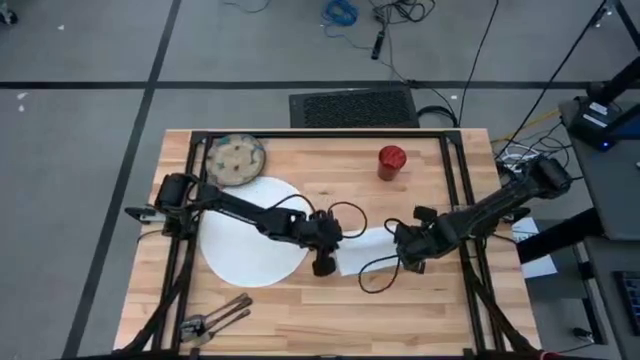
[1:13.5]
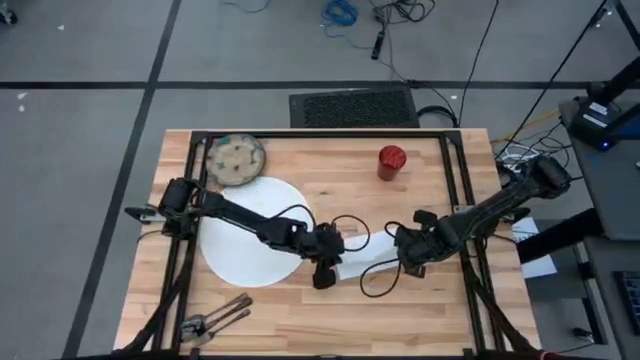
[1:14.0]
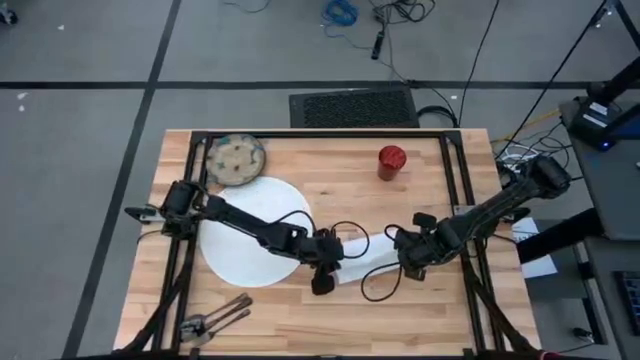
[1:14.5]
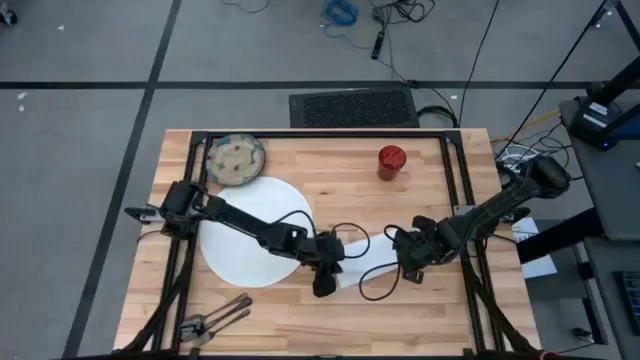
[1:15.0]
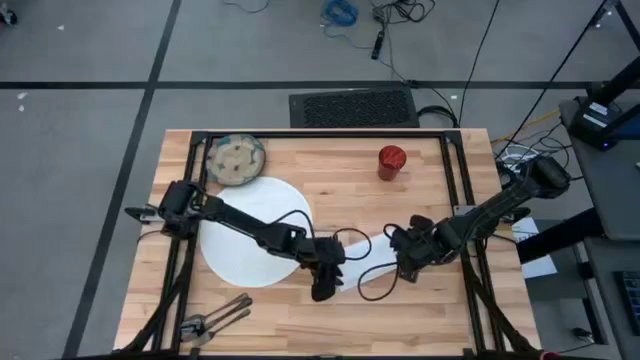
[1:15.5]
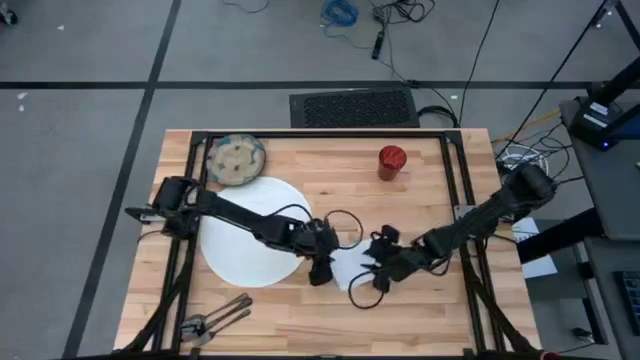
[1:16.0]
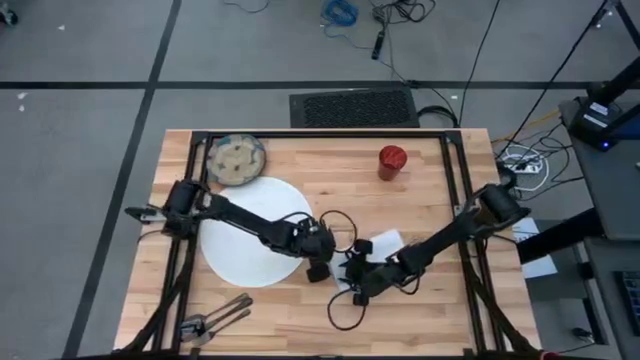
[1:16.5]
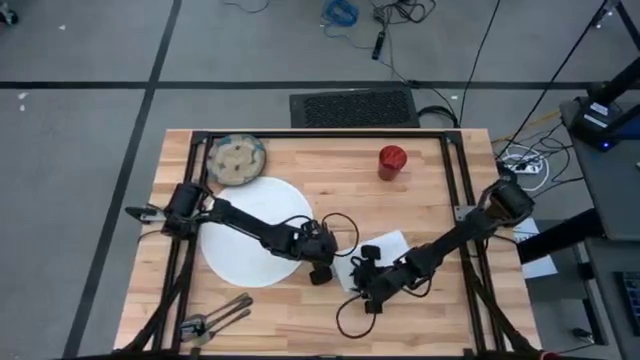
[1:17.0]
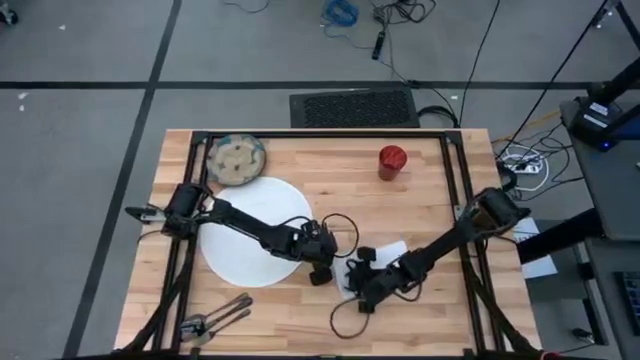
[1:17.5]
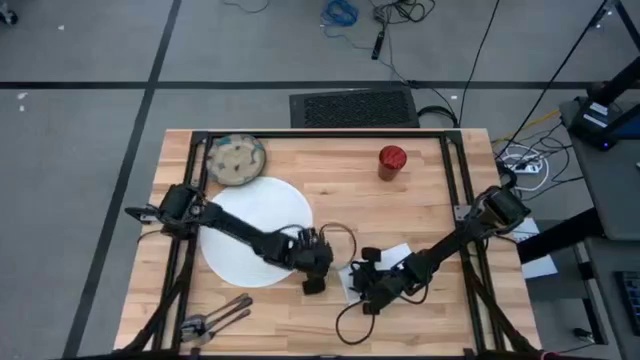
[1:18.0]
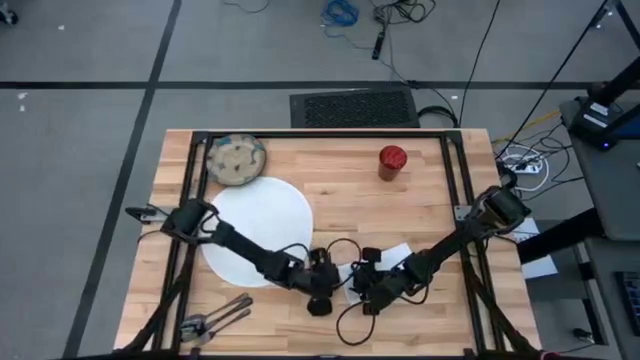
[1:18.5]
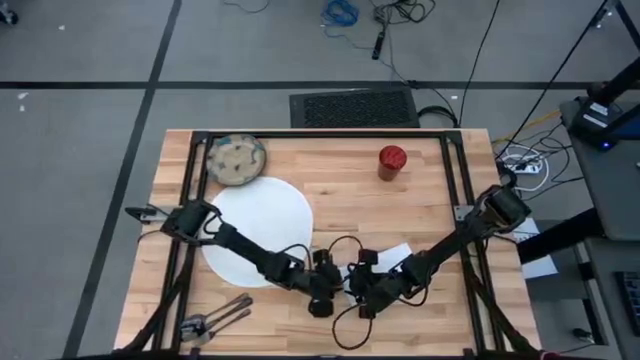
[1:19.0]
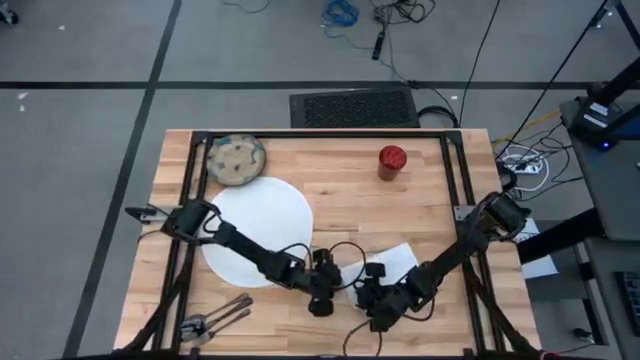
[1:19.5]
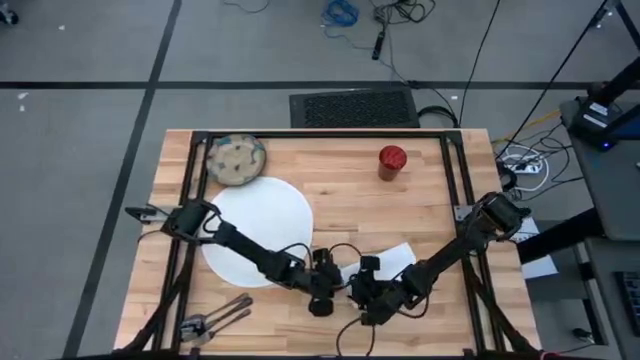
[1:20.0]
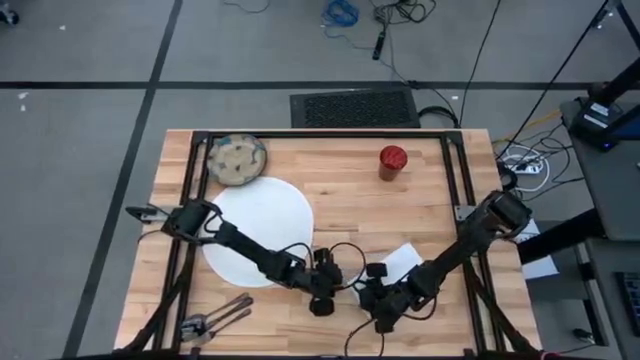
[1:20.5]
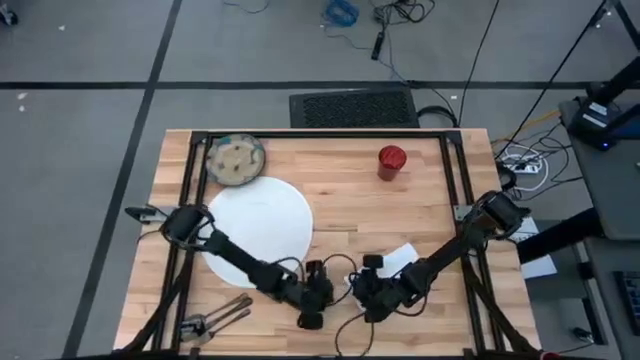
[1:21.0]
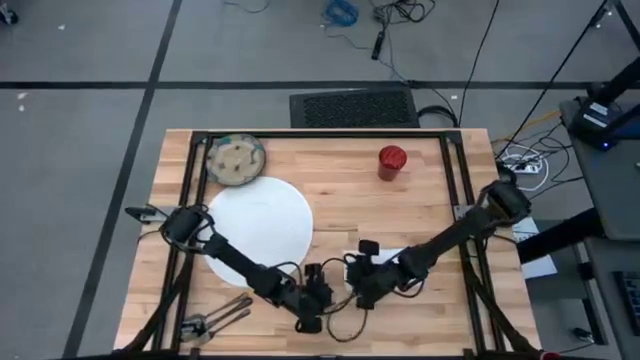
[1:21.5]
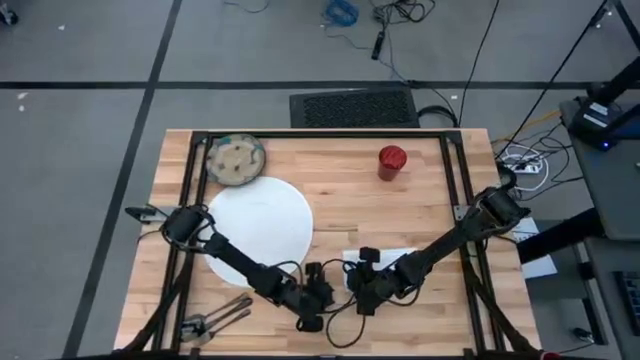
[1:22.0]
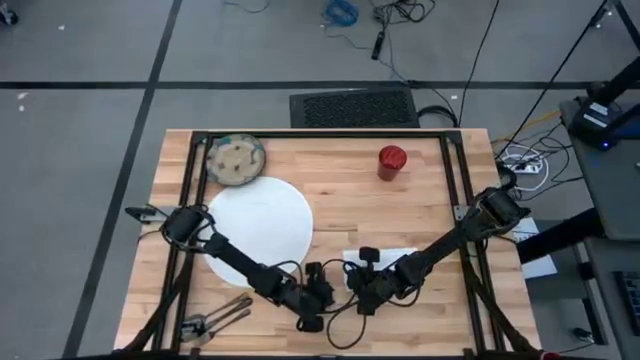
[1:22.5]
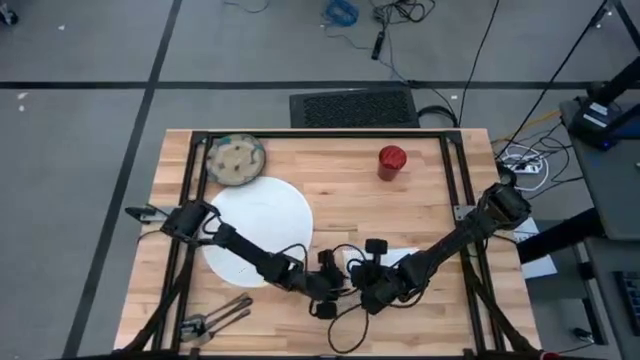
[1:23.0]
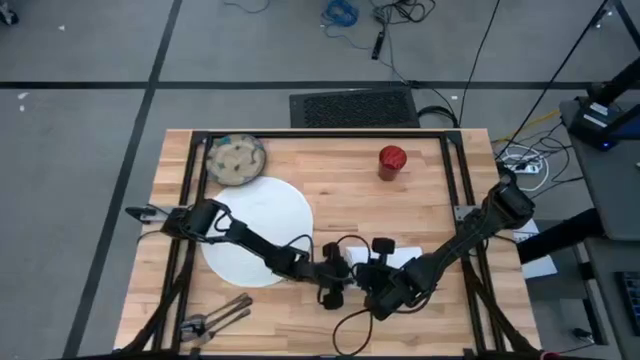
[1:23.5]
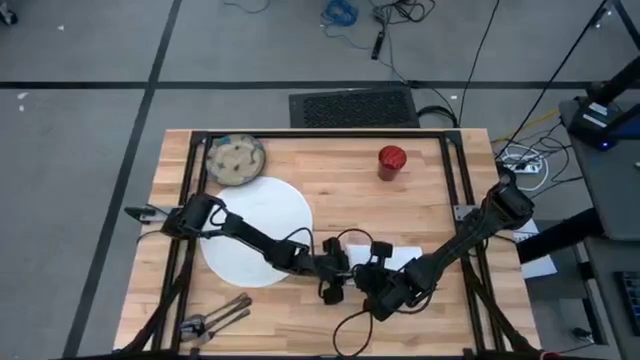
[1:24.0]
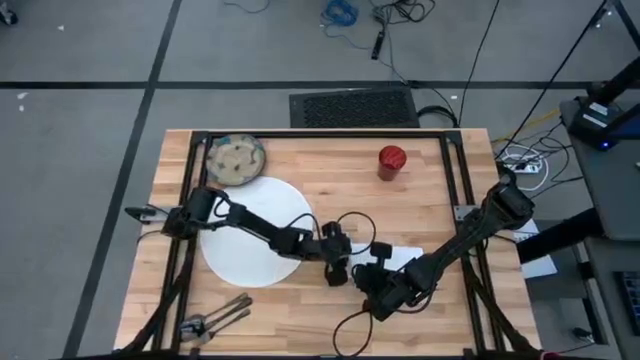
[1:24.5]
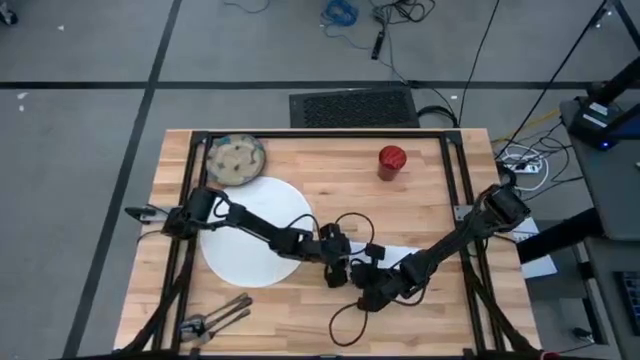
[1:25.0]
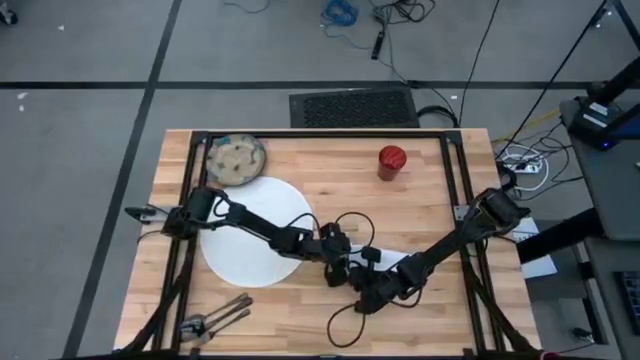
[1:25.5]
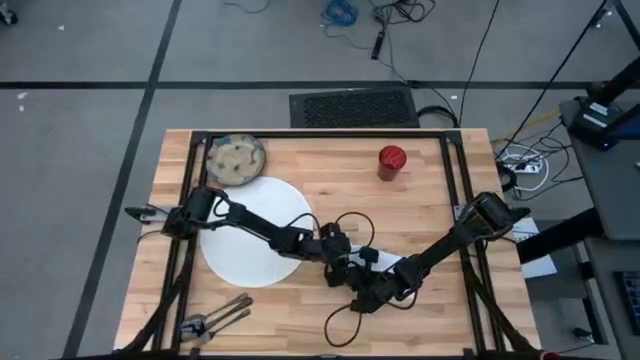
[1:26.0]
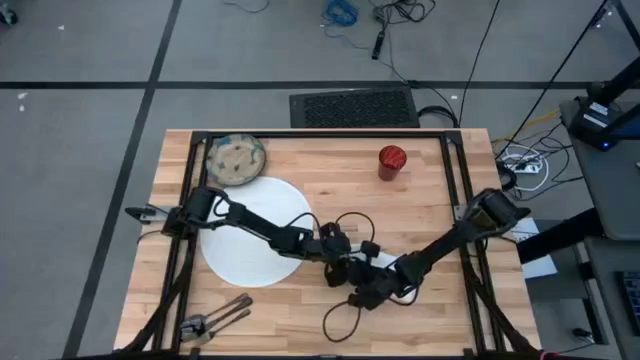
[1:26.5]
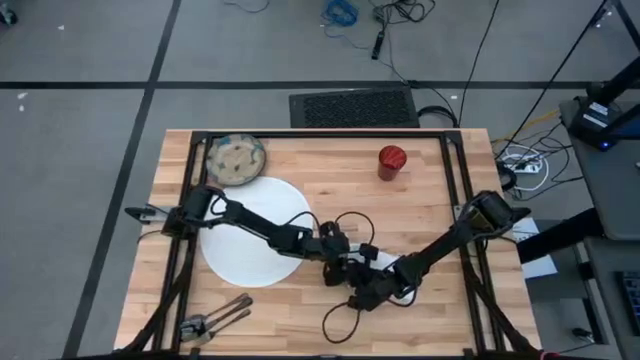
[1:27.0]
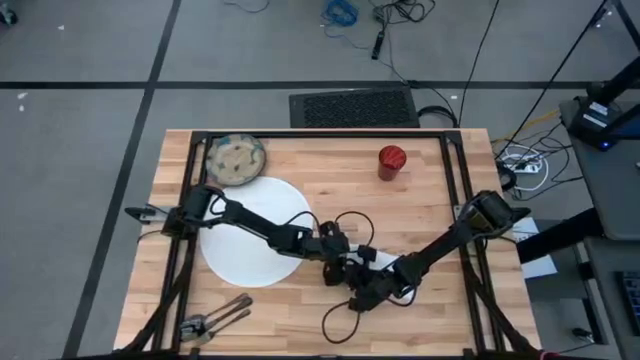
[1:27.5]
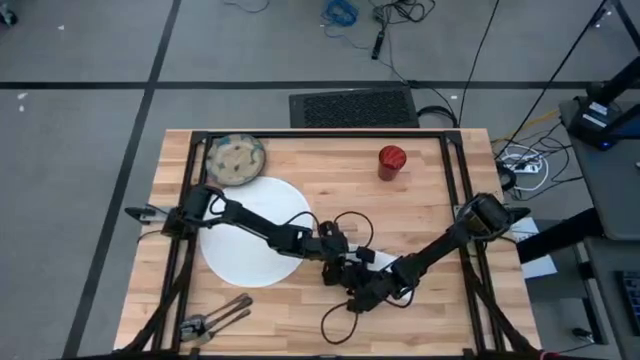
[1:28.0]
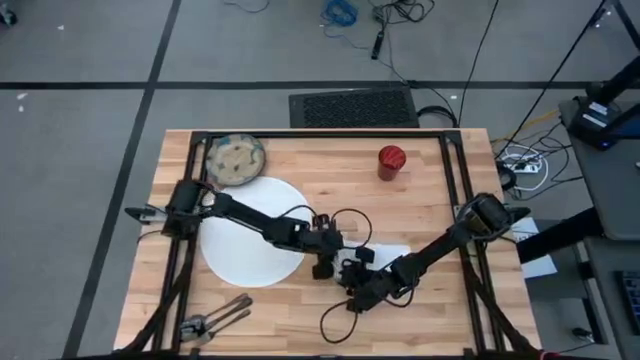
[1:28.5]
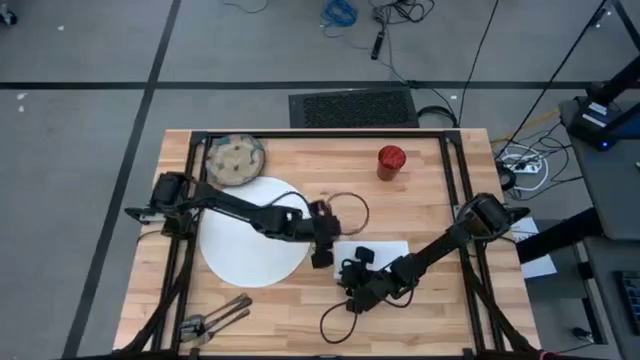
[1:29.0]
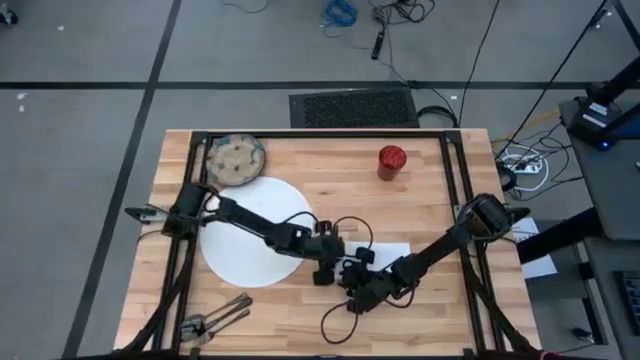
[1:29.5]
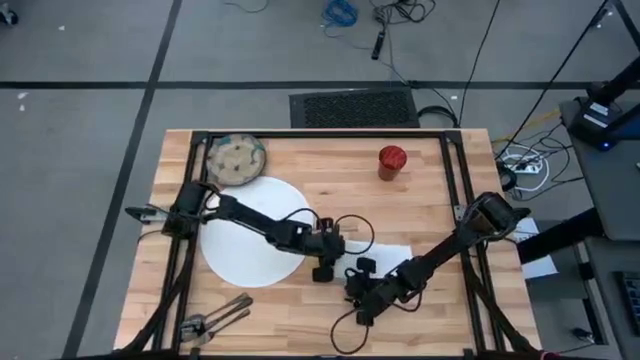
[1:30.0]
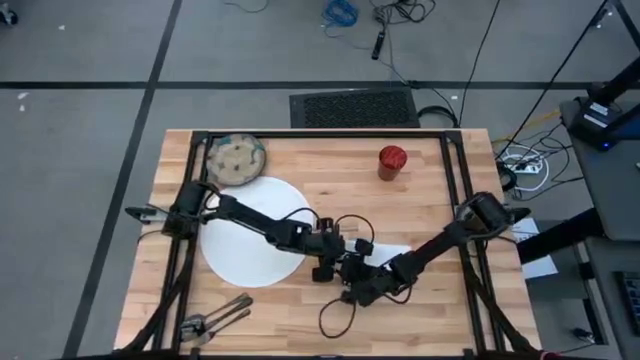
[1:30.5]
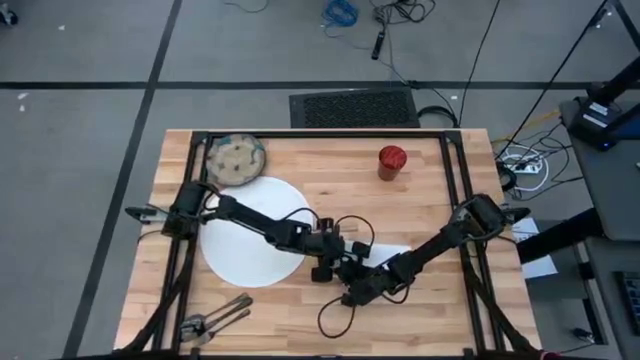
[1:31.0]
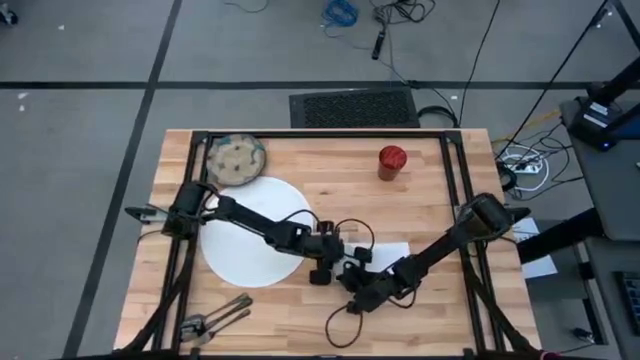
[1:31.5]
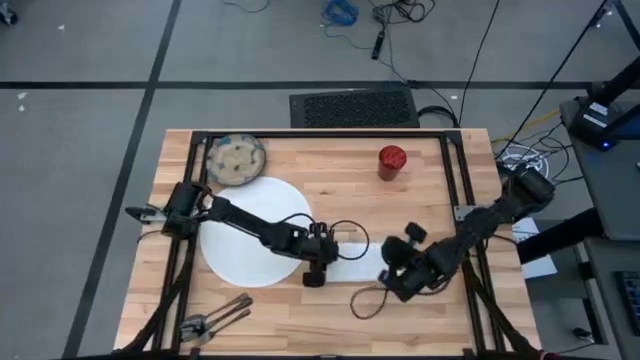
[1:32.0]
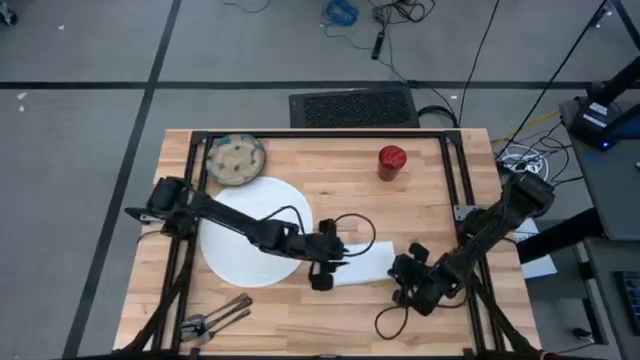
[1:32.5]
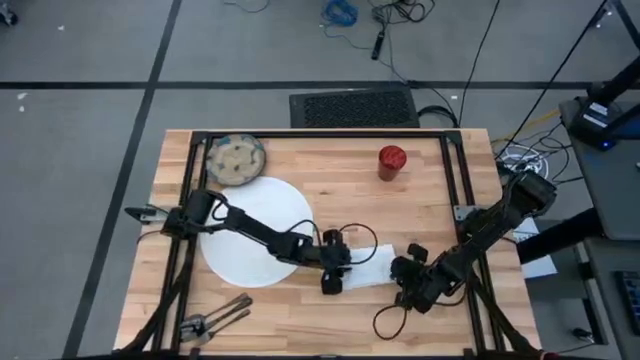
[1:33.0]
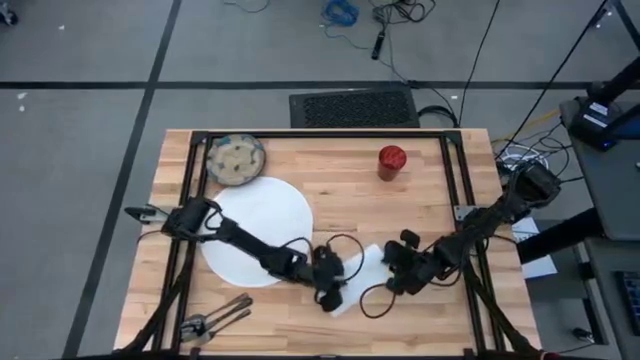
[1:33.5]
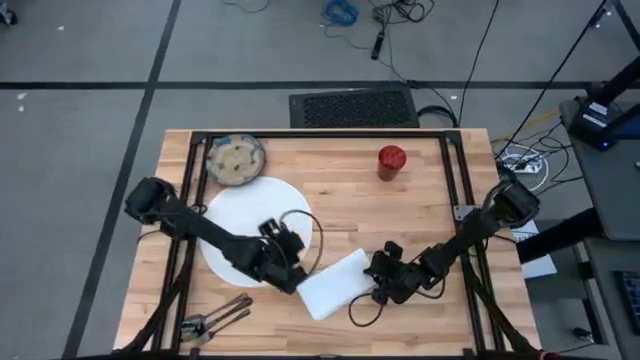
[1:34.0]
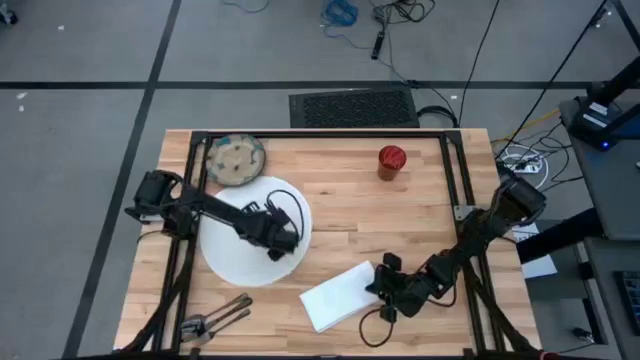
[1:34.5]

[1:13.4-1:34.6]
Task: Set table place
Fold the white napkin

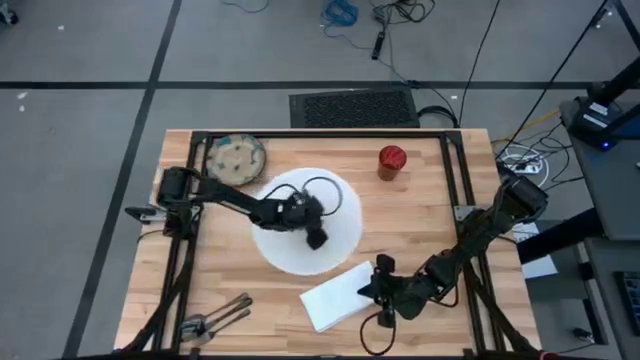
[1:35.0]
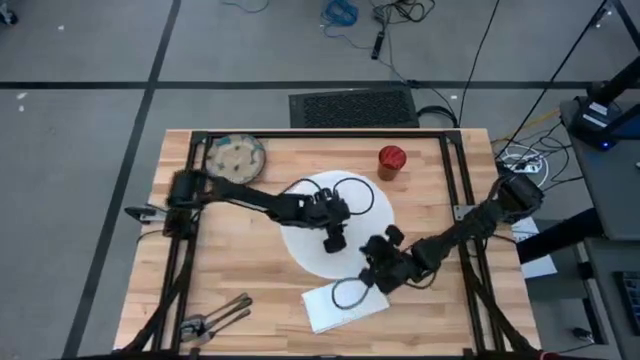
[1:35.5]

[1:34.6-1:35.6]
Move the white mat to the center of the table
